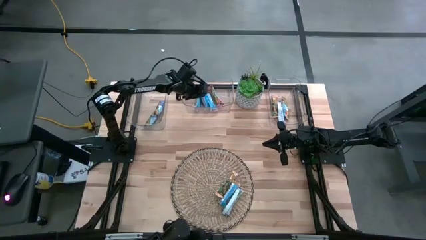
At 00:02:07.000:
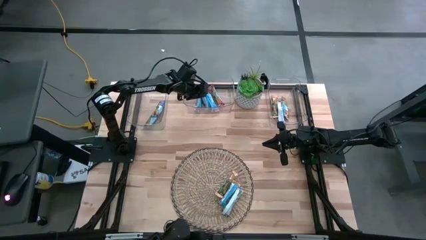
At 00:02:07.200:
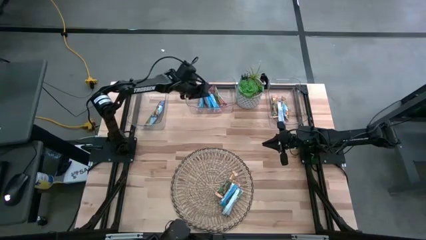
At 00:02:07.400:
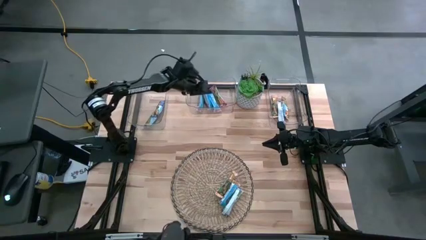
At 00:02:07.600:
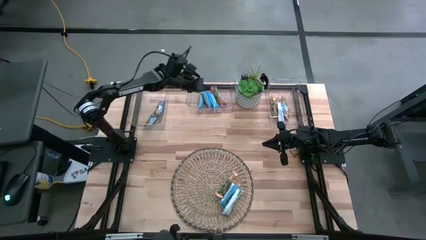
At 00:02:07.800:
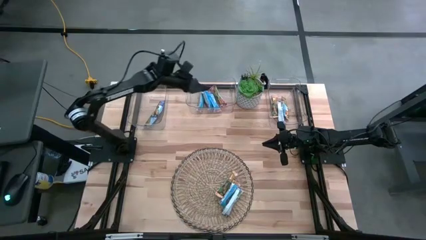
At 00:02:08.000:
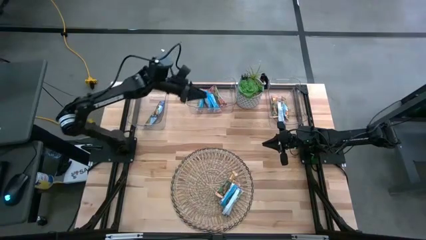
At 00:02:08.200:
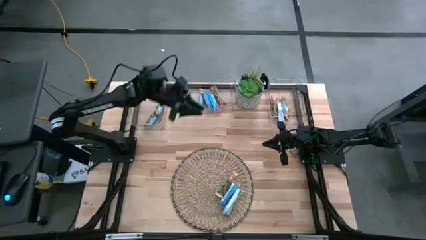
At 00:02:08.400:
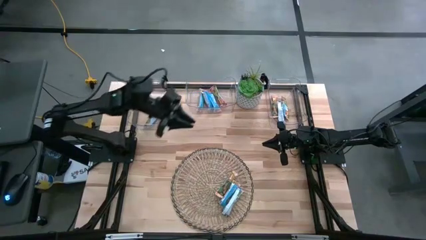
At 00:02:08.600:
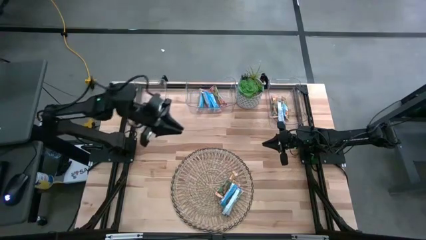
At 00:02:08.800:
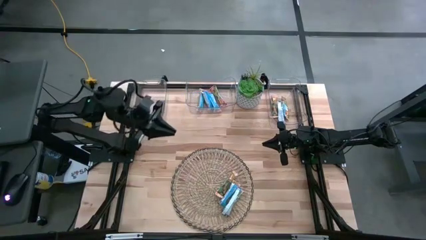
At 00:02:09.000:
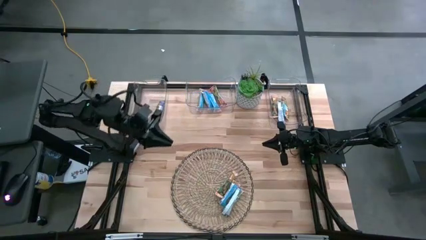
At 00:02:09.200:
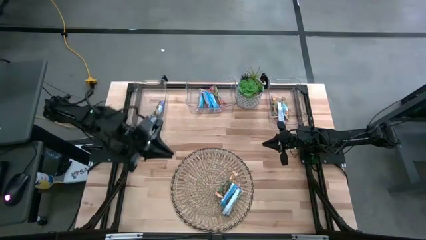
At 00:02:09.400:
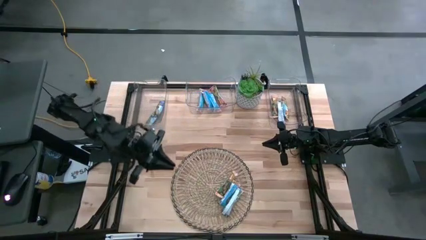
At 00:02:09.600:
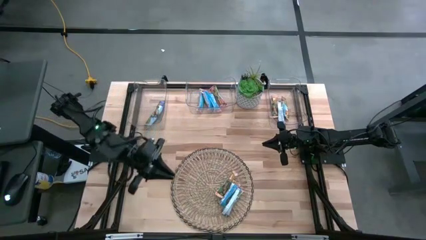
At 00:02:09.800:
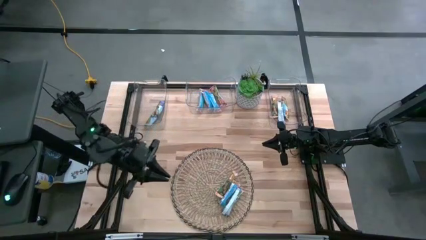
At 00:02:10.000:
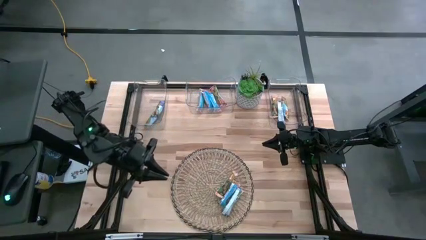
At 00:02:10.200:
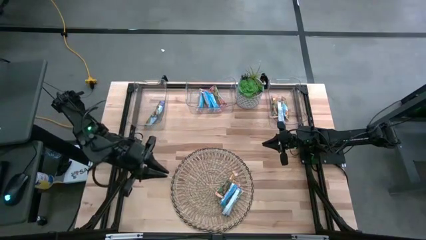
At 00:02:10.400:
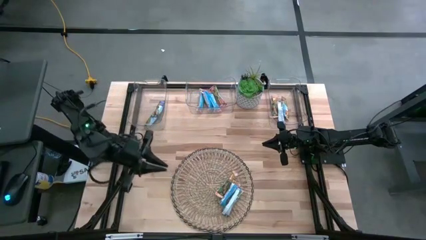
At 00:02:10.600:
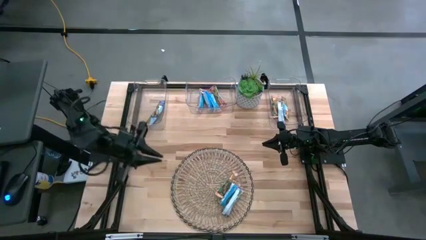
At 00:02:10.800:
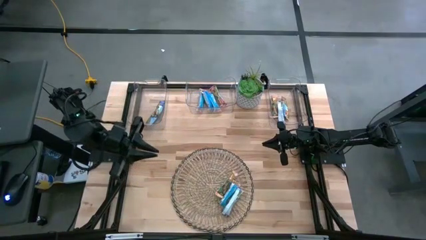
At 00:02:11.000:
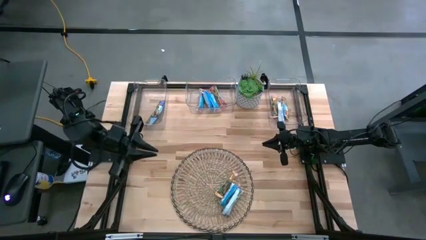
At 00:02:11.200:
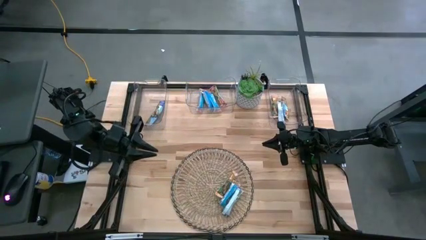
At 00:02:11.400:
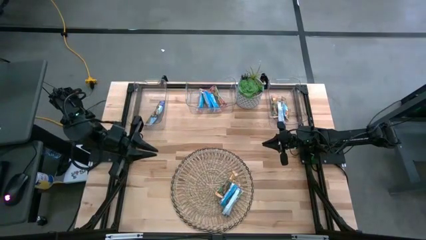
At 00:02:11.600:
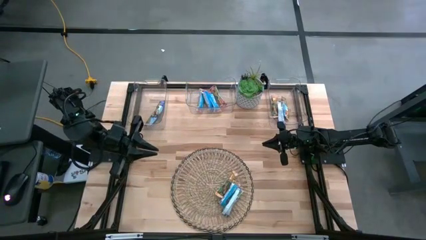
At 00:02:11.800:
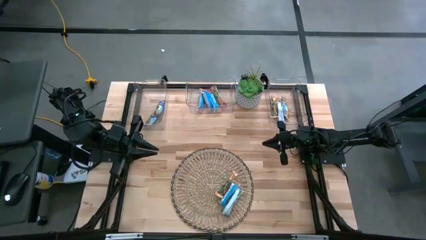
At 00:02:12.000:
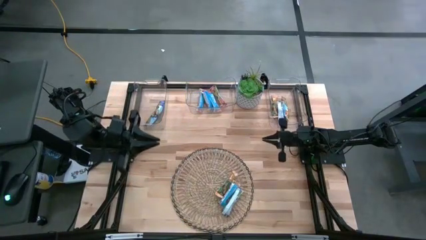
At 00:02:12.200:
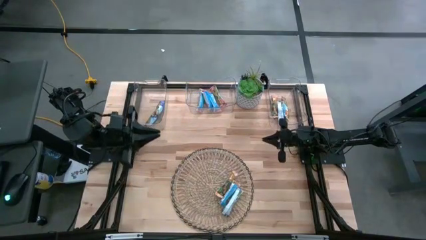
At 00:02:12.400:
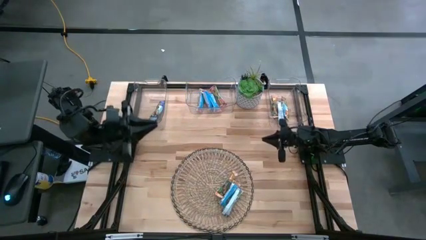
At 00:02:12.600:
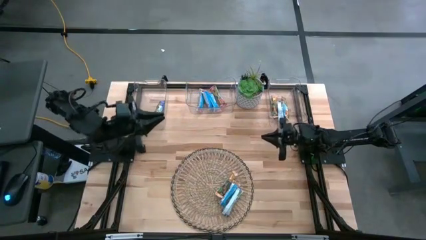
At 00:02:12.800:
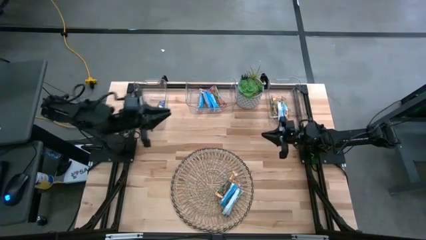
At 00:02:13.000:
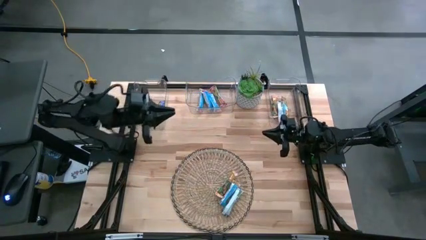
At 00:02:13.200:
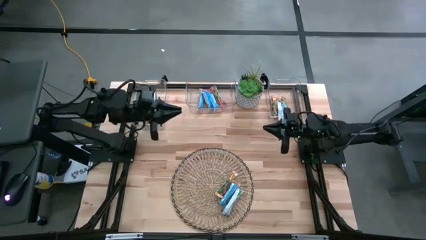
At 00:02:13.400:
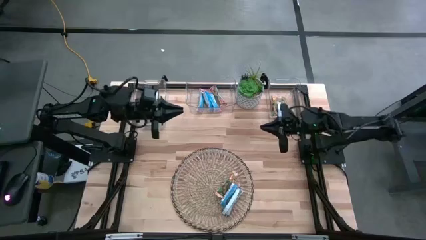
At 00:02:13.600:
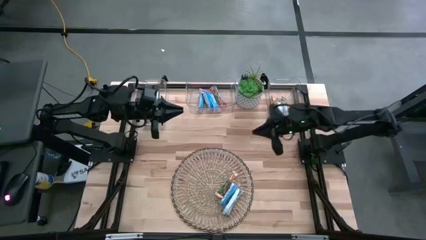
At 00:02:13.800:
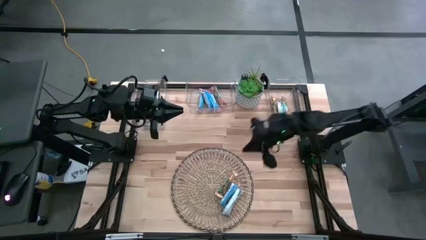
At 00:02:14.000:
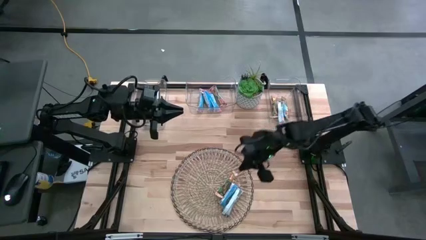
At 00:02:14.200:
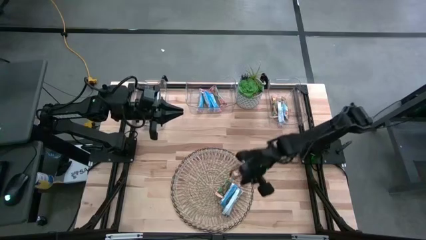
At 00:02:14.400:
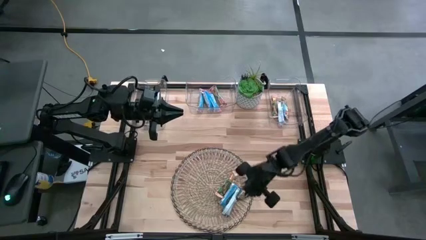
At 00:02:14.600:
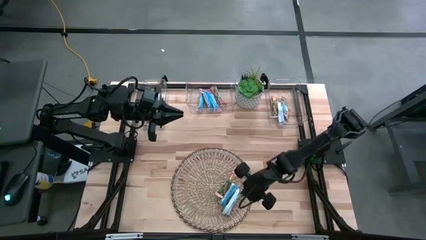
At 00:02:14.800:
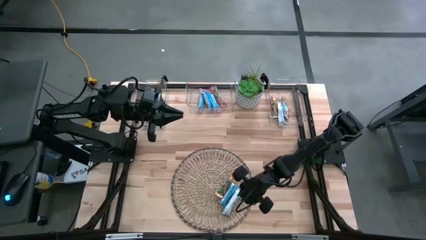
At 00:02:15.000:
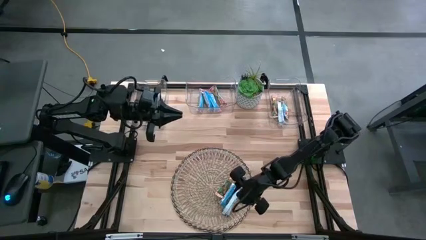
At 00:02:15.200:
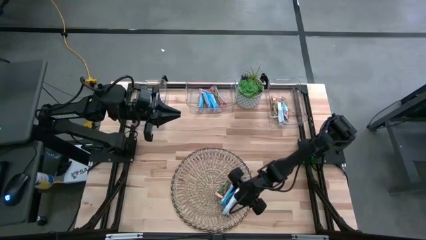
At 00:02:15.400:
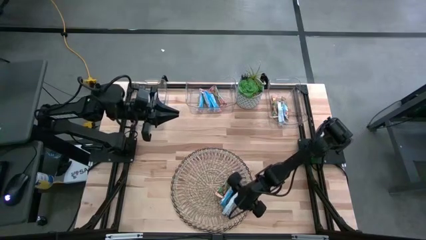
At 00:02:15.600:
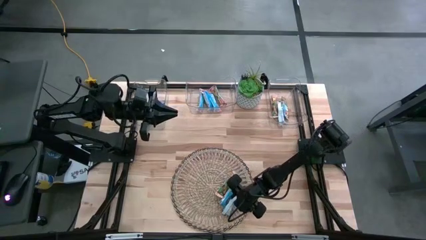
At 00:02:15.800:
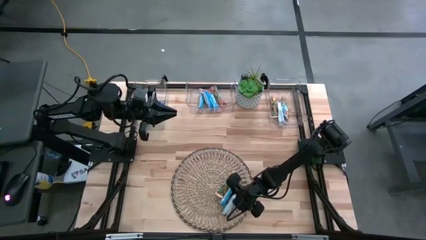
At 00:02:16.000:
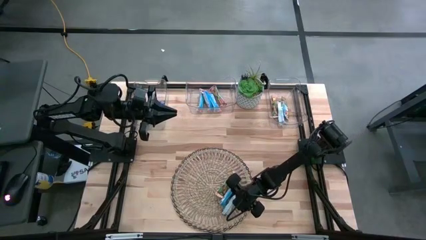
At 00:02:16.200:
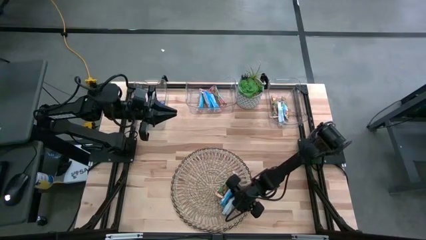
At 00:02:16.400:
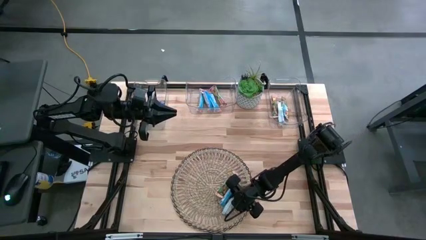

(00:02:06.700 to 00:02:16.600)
Task: Pick and place Granola Bars by type
Put the blue granola bar into the left transparent bin
